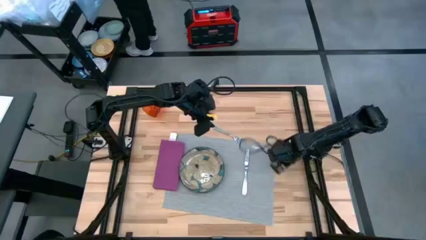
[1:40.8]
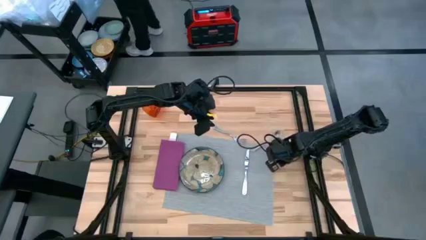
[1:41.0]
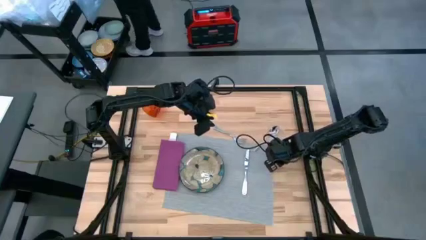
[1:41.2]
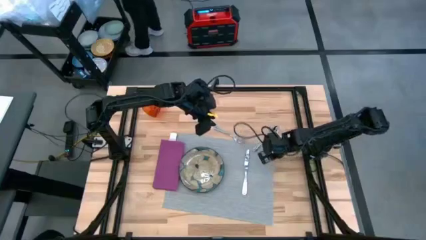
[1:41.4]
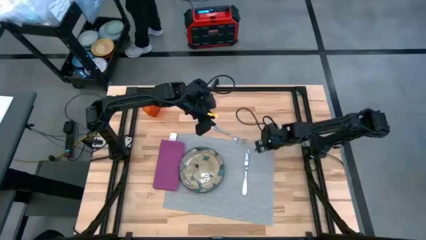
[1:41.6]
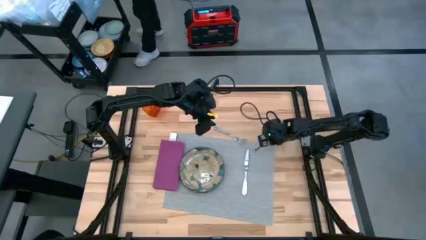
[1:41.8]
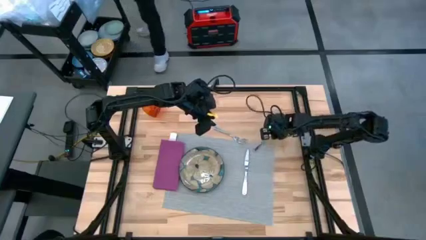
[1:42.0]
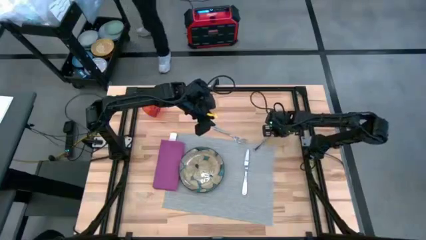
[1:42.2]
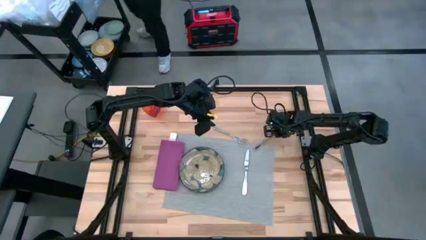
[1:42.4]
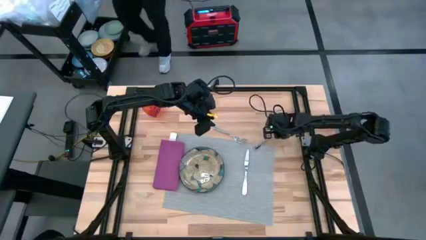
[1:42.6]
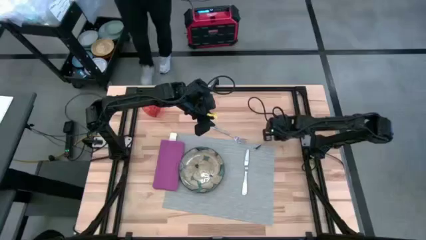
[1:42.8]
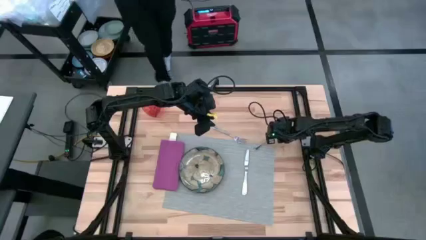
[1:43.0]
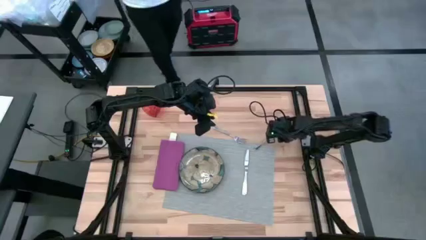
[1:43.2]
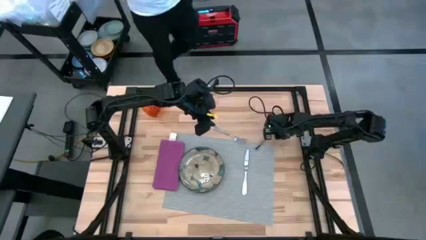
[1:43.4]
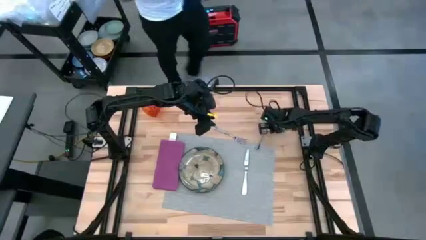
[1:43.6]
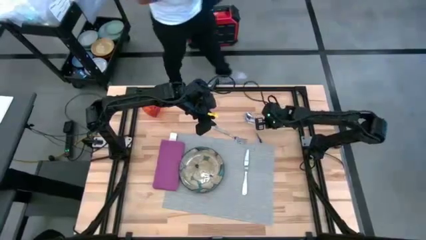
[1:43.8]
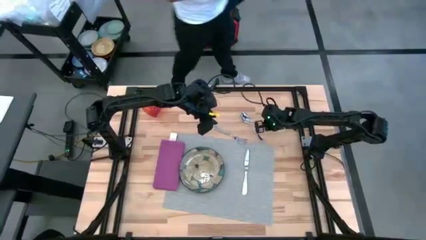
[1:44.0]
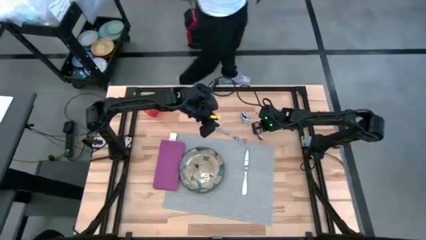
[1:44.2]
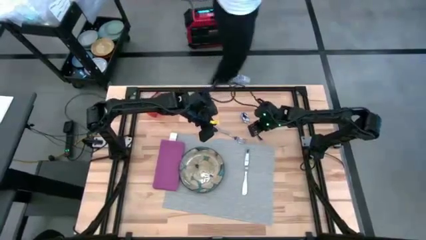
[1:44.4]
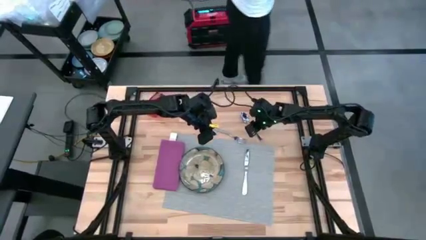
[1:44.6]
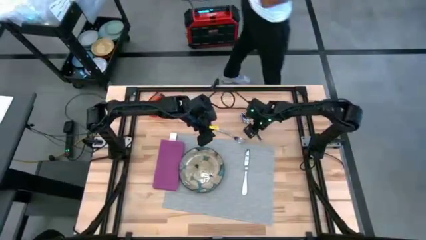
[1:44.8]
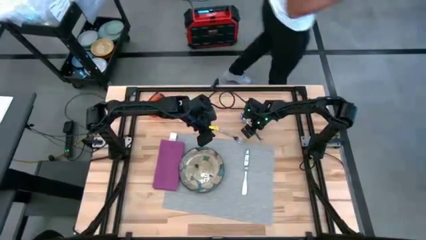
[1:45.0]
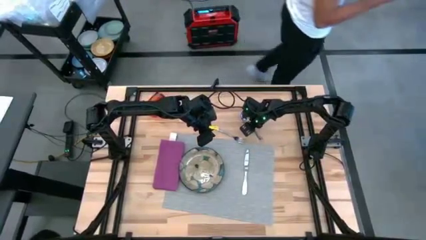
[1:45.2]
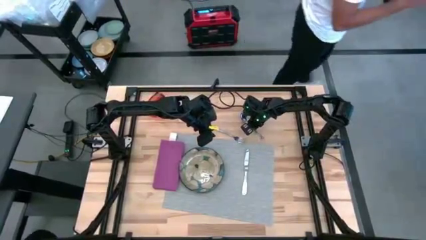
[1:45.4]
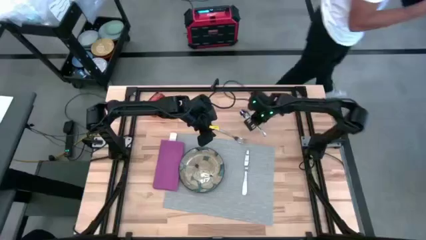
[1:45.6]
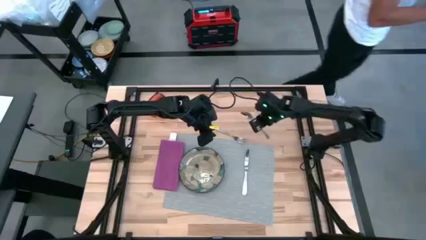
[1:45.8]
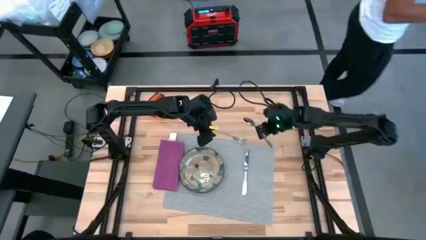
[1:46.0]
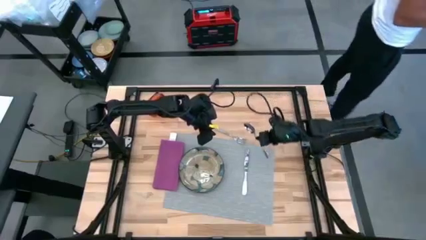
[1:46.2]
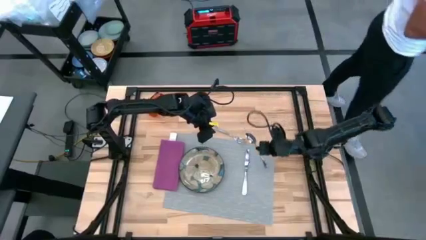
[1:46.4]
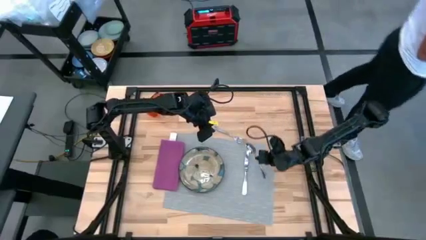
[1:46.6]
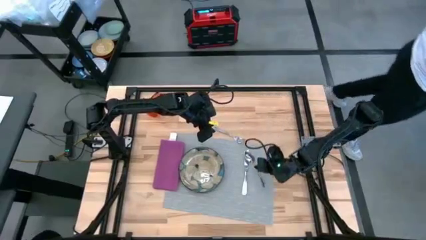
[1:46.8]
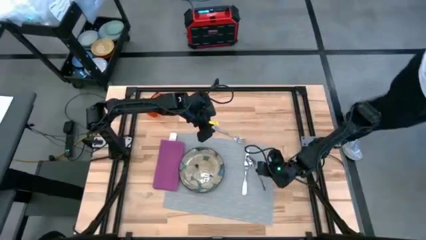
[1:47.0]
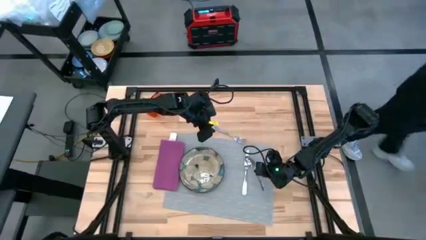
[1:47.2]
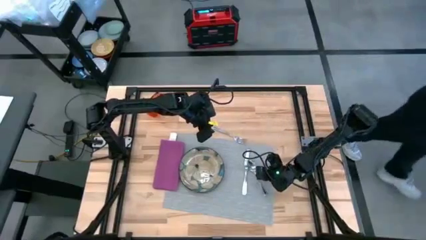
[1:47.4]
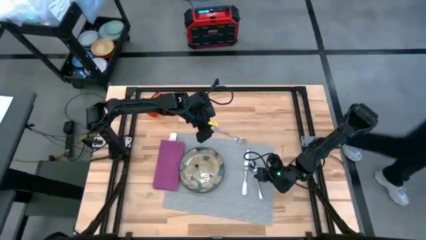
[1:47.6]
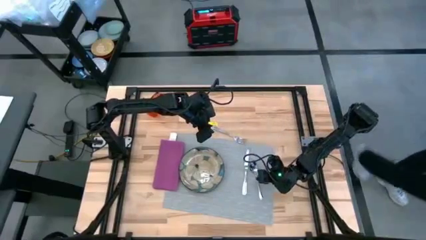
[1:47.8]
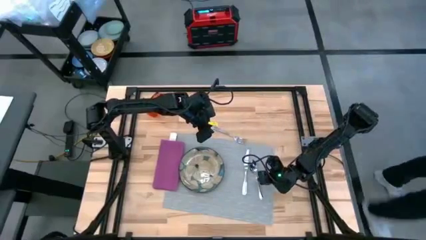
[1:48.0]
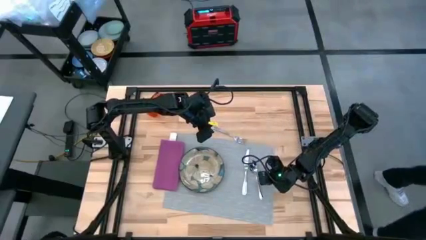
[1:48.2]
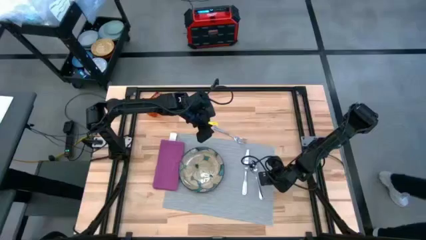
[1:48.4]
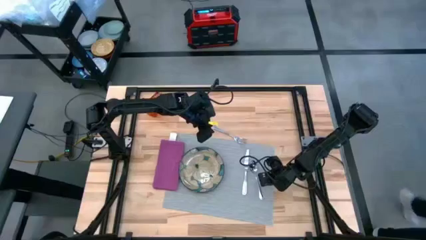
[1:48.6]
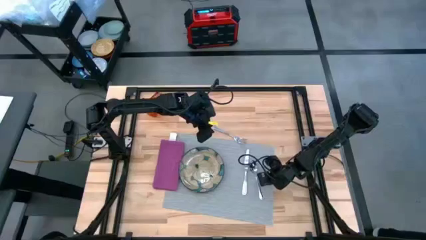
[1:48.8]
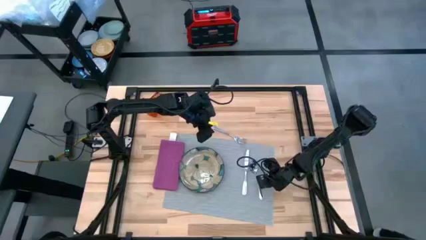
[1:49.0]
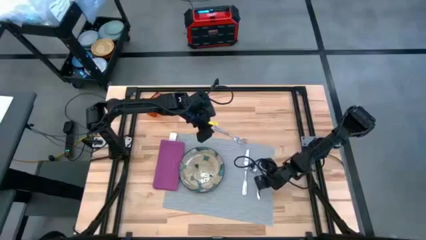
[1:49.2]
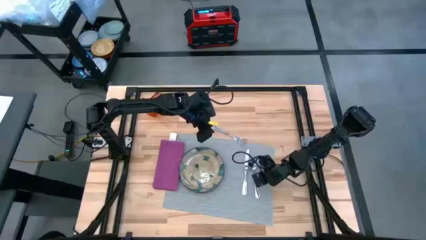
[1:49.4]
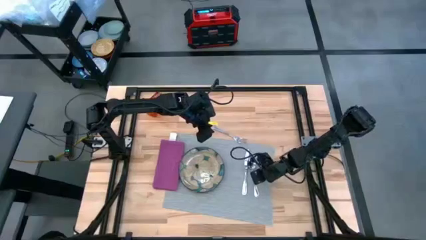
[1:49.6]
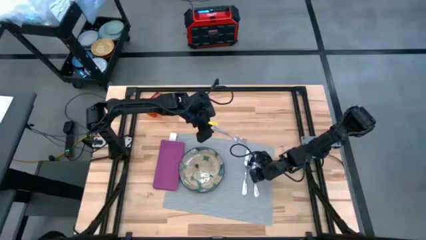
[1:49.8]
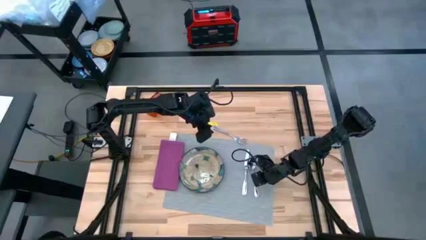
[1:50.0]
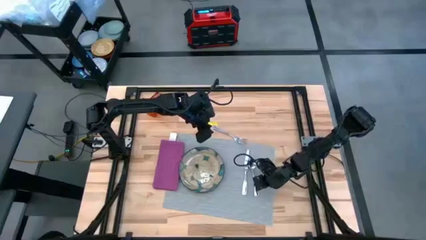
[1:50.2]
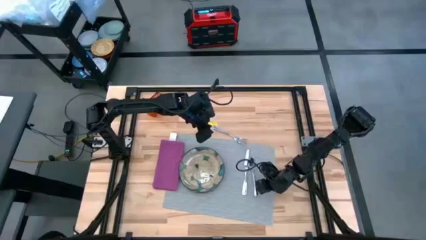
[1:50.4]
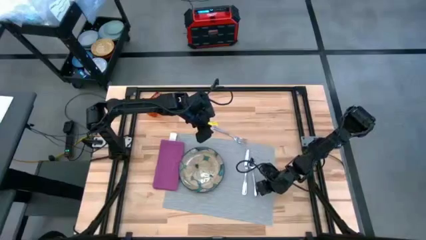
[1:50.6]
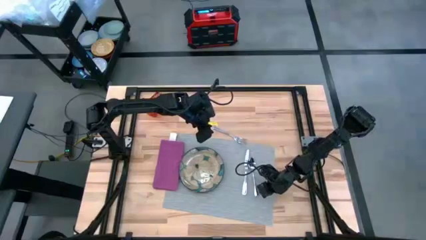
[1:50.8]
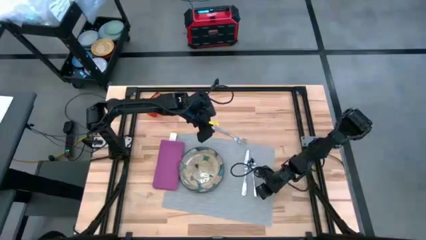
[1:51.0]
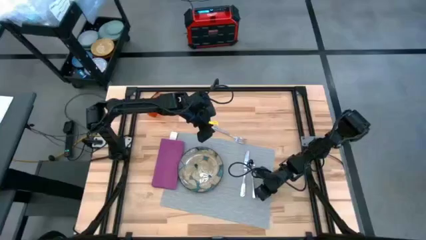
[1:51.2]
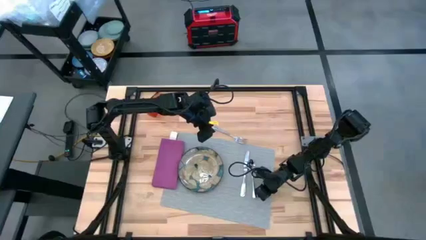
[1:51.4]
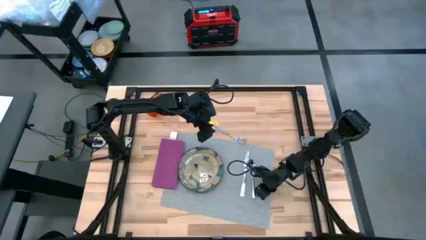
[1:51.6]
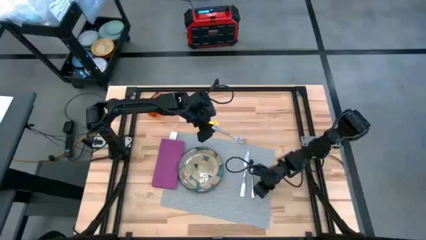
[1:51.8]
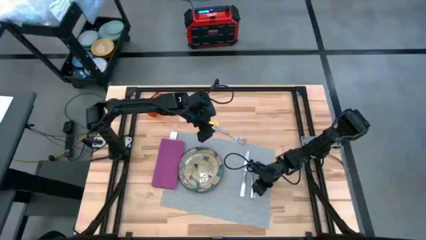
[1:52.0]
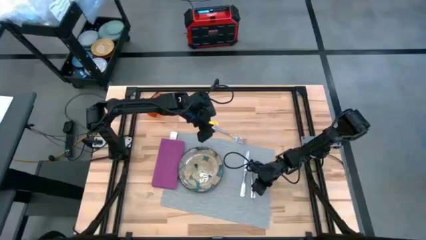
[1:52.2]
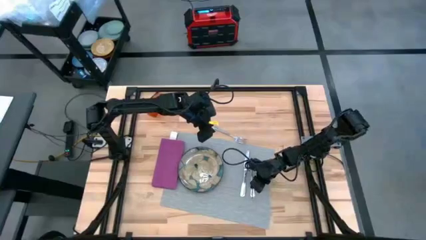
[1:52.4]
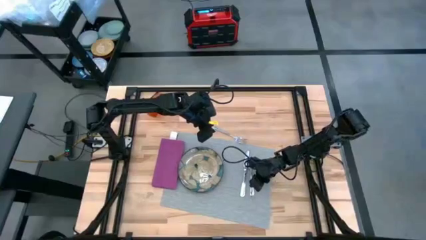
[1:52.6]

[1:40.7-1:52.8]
Task: Set table place
Put the silver spoon to the right of the silver table knife on the table mat

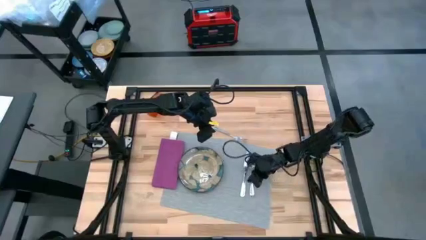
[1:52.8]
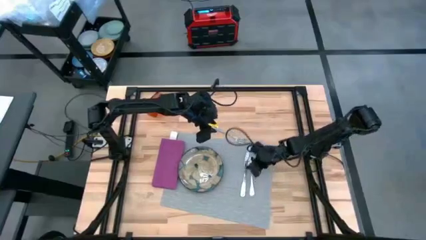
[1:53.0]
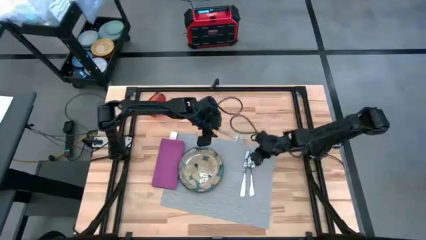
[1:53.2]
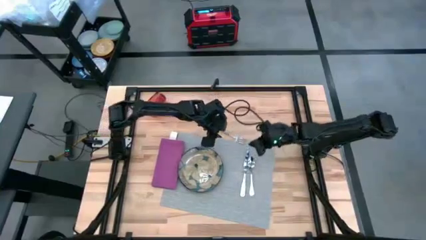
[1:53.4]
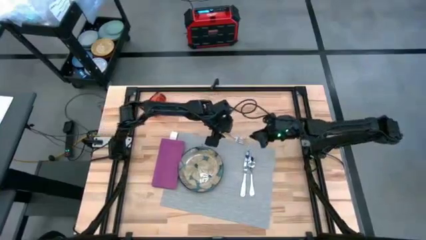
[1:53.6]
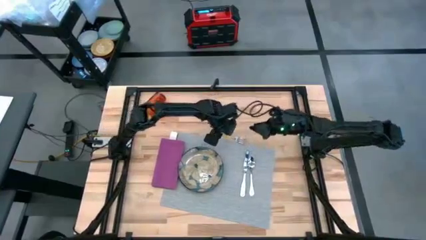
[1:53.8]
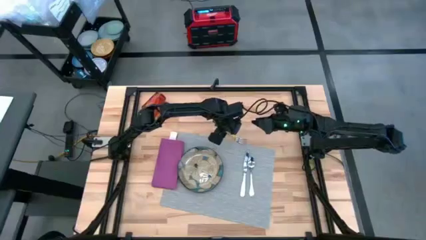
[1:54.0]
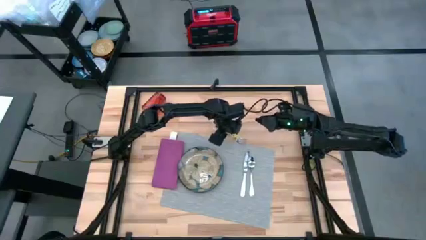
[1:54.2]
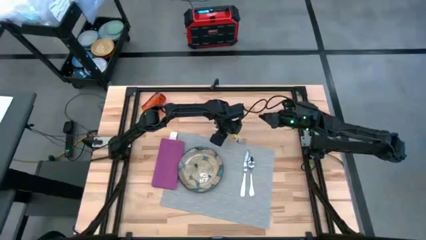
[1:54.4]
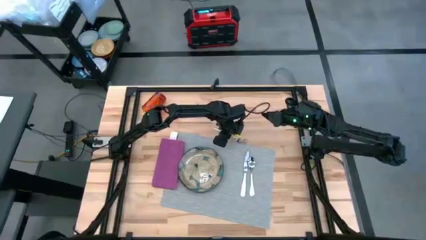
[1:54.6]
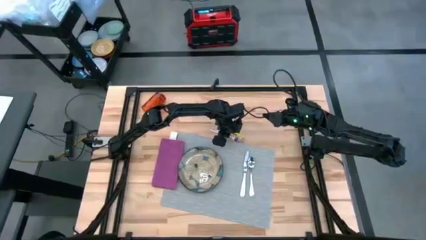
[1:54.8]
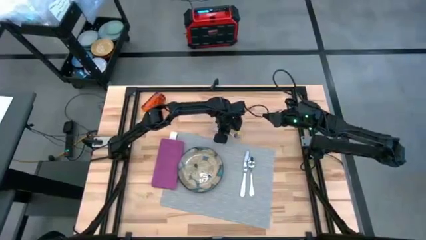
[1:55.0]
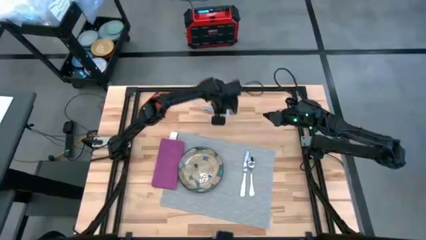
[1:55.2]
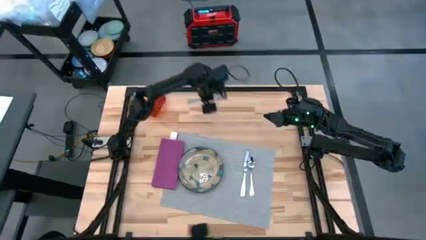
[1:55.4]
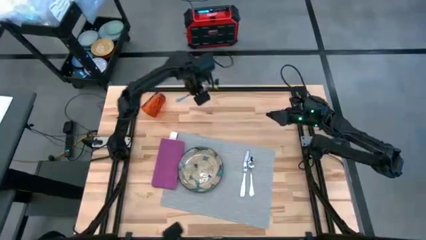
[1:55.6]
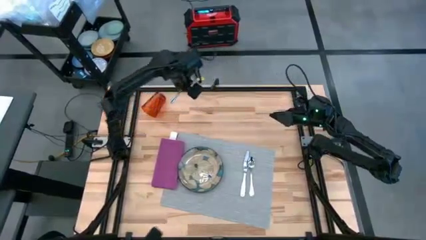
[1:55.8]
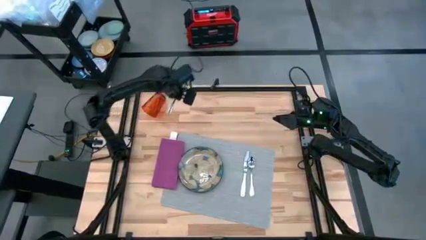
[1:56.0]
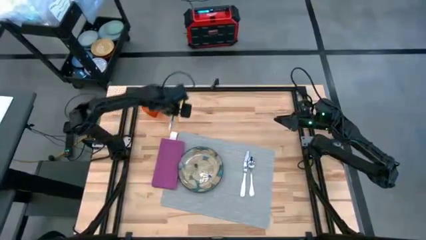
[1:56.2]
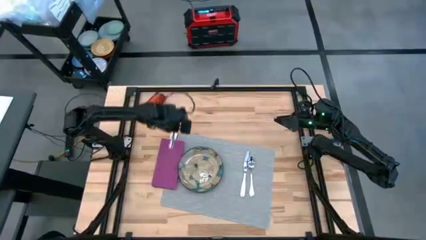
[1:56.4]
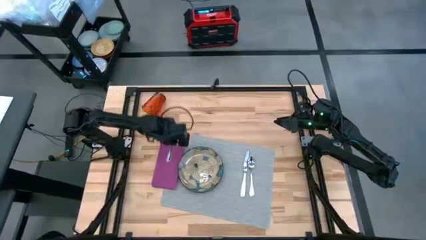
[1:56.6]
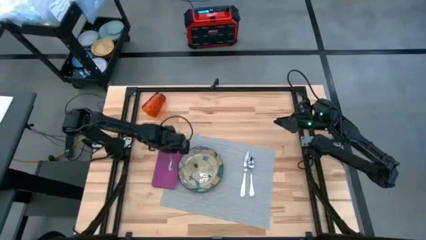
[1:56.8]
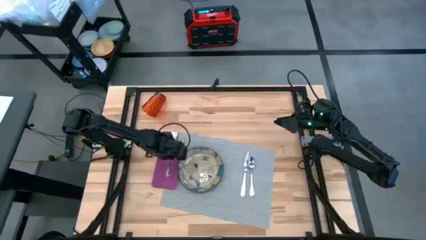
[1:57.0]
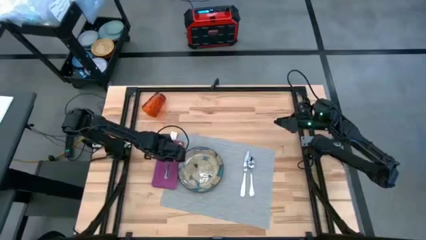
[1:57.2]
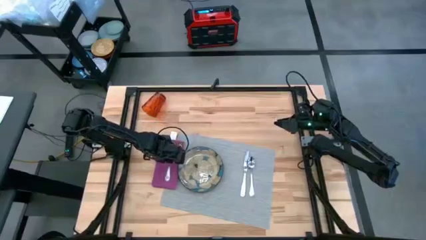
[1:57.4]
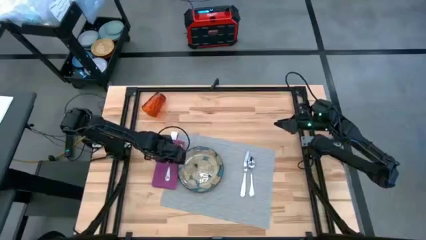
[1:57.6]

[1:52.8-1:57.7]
Put the silver fork on the folded pink table napkin
